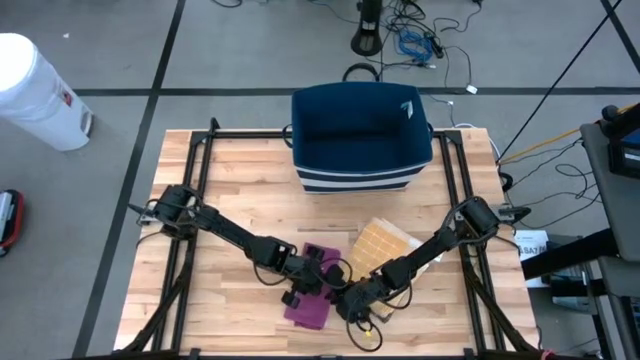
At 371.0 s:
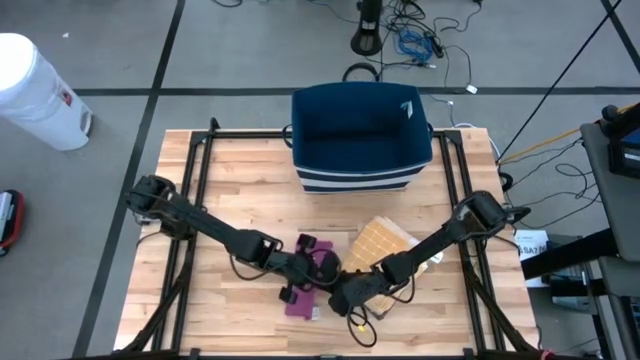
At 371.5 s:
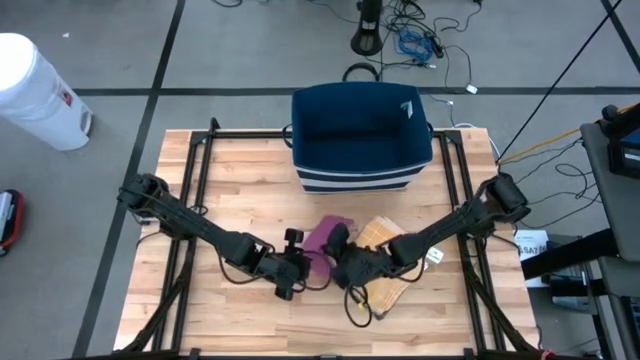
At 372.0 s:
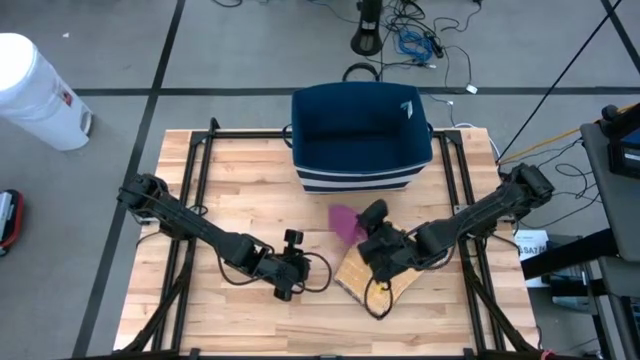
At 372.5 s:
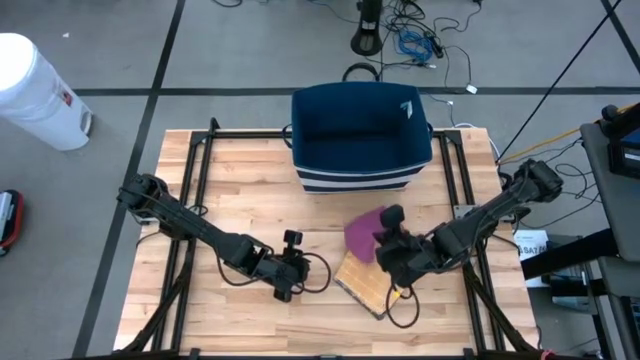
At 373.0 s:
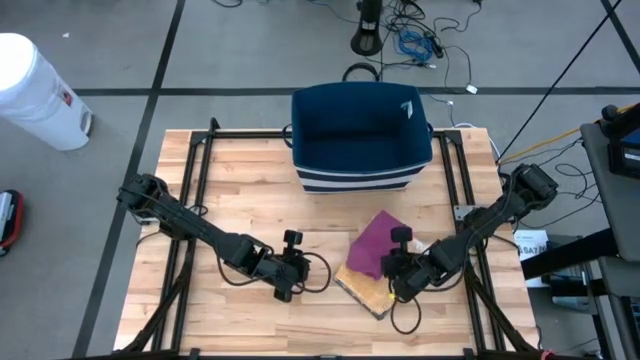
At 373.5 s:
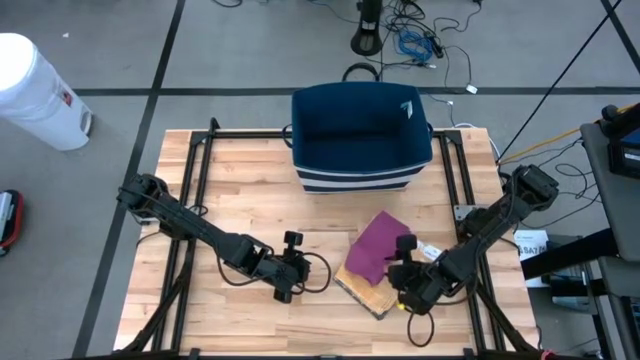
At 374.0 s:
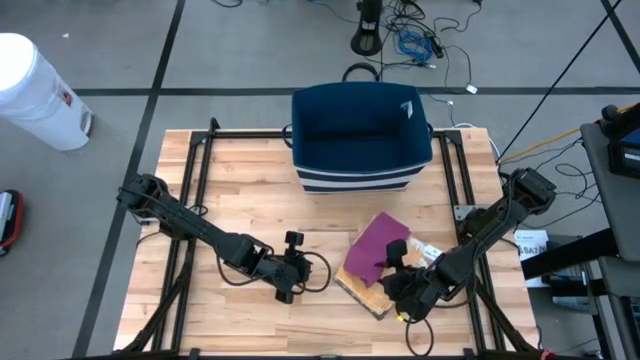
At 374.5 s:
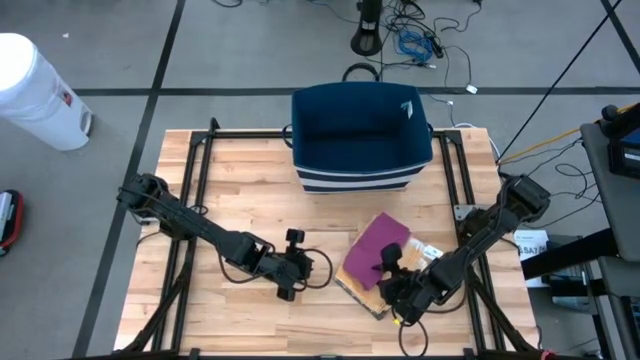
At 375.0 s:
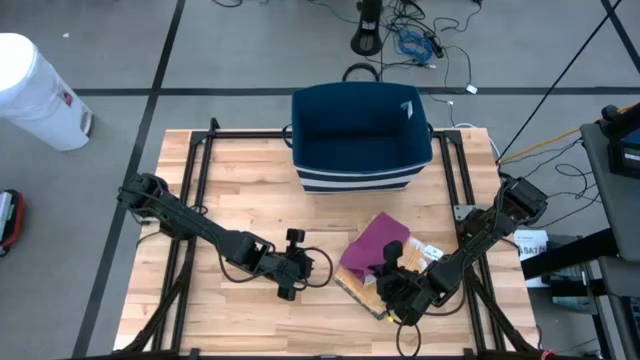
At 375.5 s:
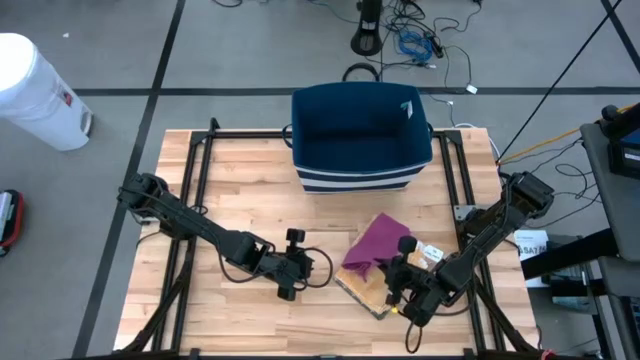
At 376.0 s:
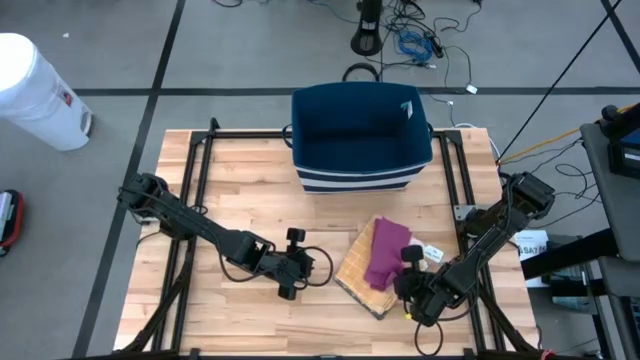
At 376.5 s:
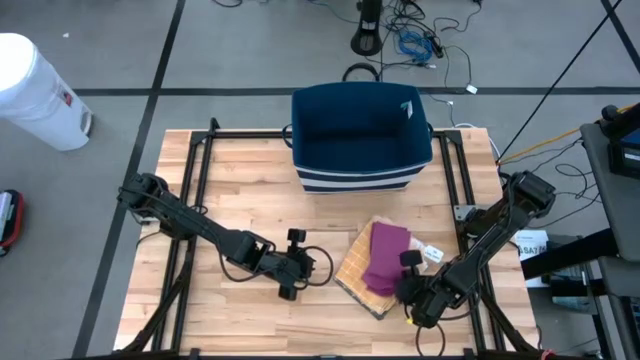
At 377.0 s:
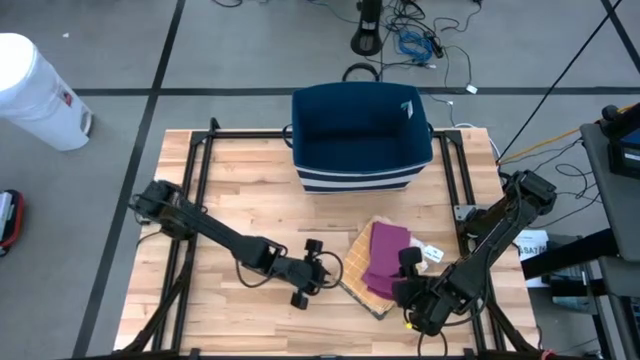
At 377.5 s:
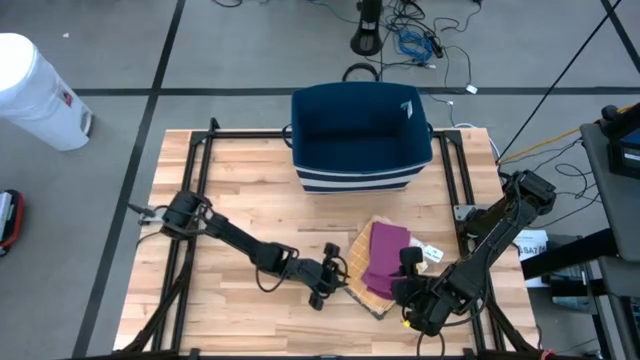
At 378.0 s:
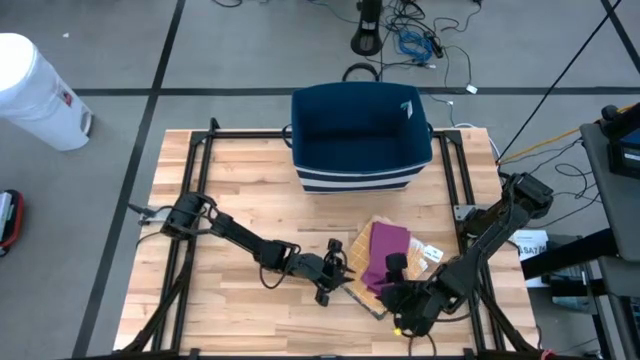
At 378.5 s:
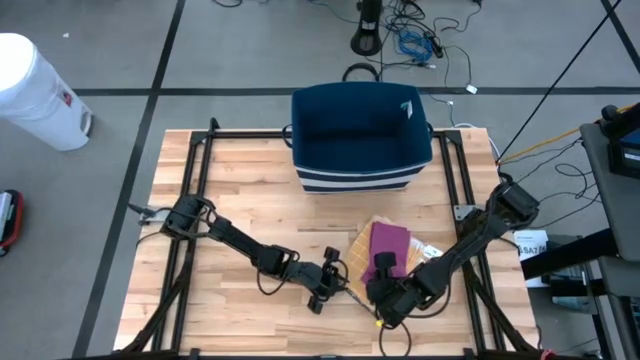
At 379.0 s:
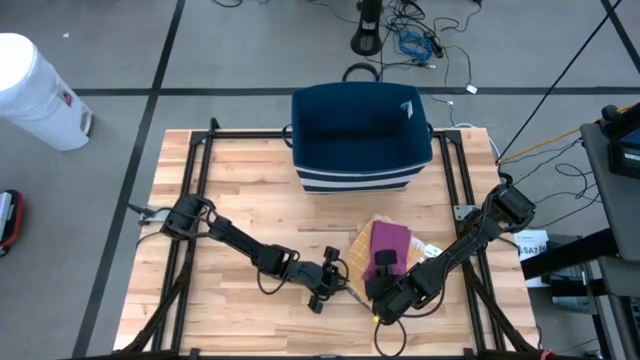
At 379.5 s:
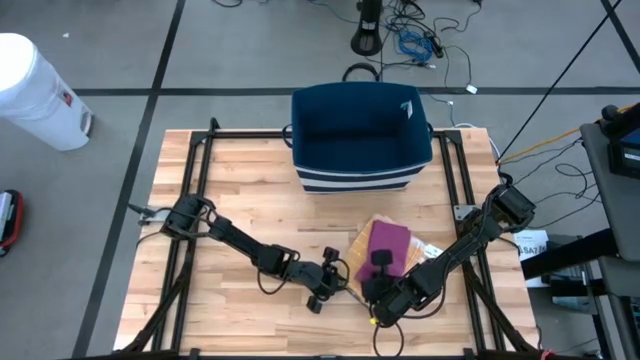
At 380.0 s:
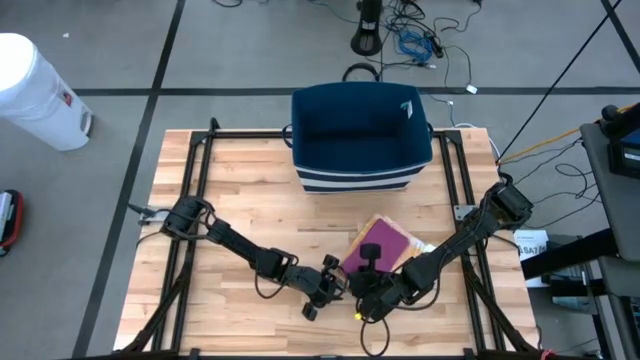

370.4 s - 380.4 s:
Task: Fold towel
Stack the purple towel on the orange patterned towel

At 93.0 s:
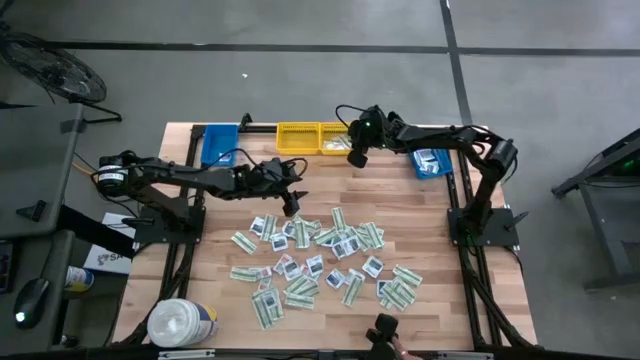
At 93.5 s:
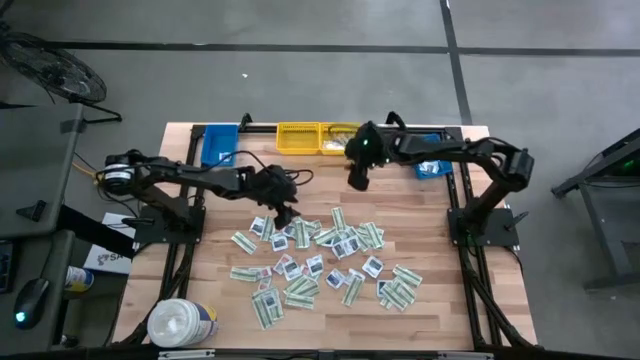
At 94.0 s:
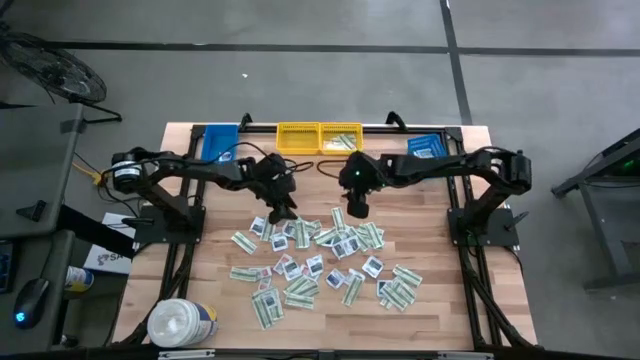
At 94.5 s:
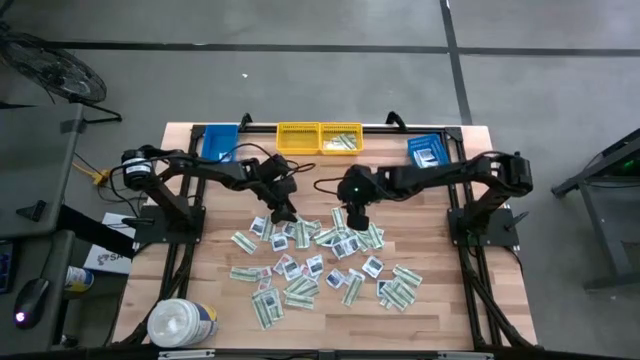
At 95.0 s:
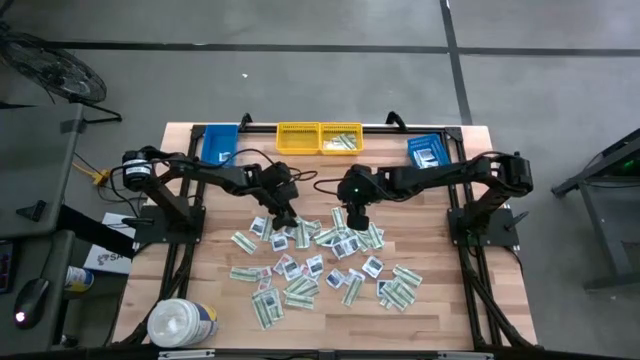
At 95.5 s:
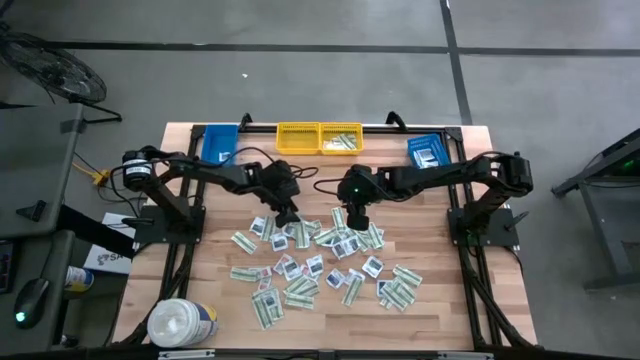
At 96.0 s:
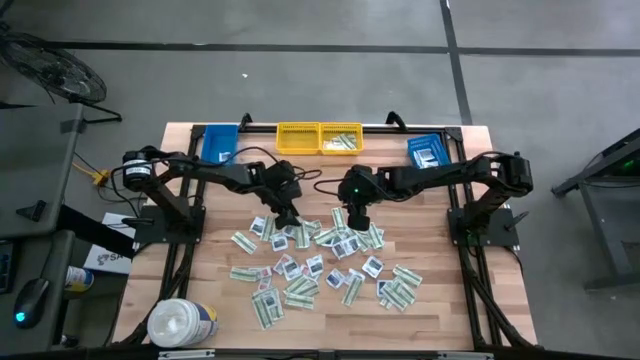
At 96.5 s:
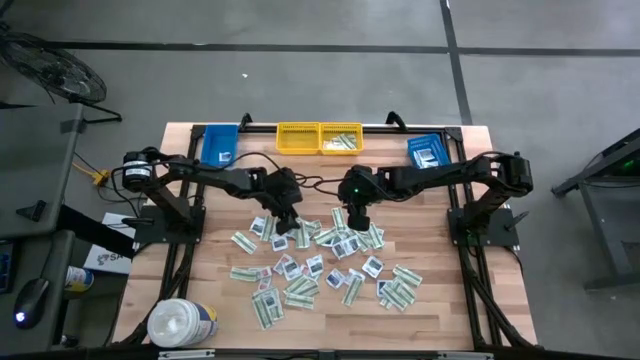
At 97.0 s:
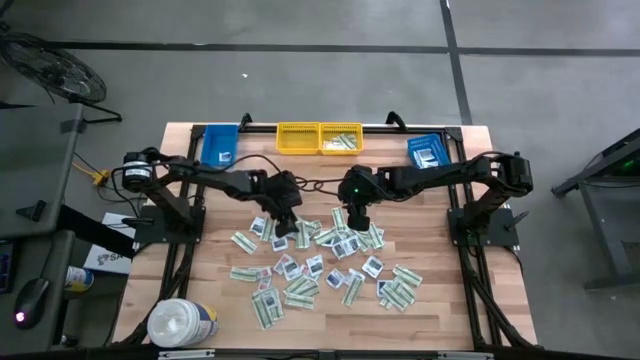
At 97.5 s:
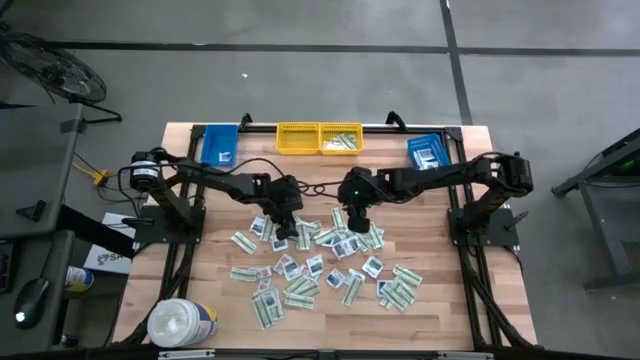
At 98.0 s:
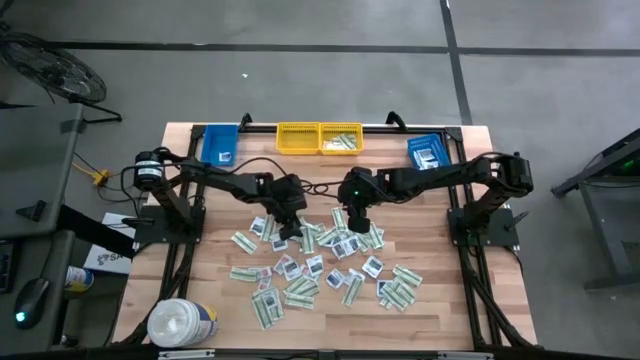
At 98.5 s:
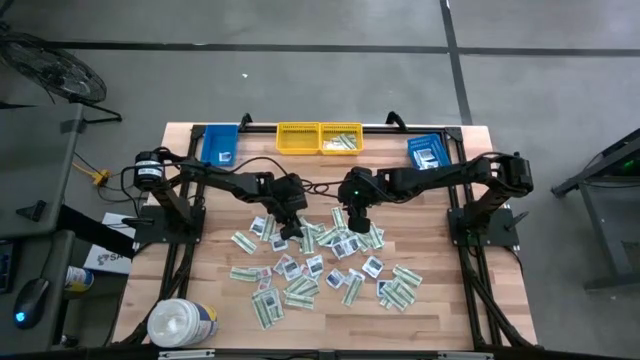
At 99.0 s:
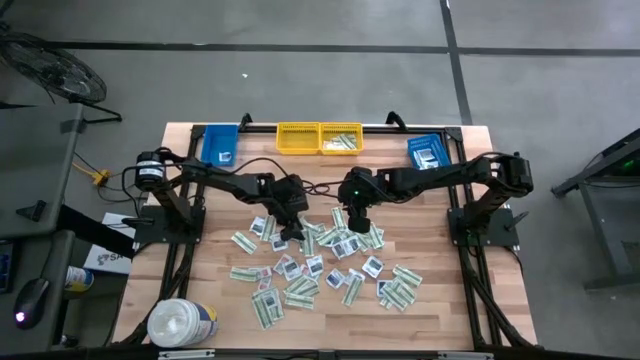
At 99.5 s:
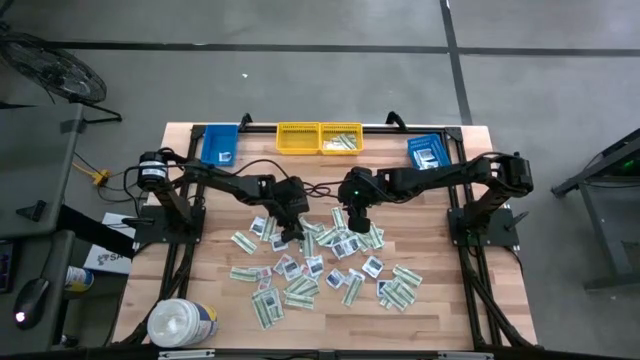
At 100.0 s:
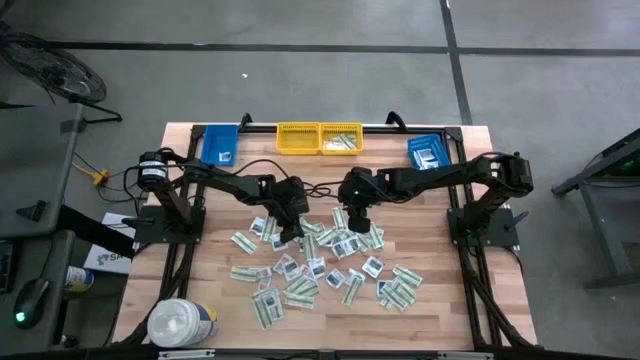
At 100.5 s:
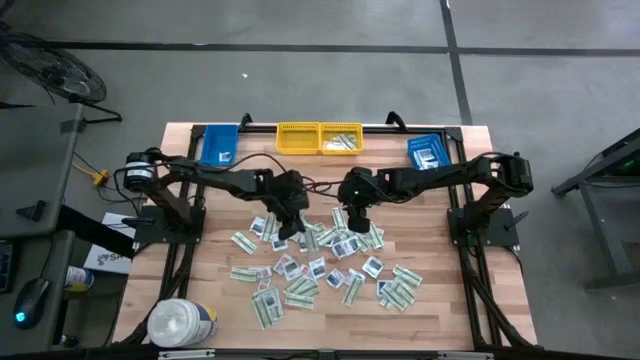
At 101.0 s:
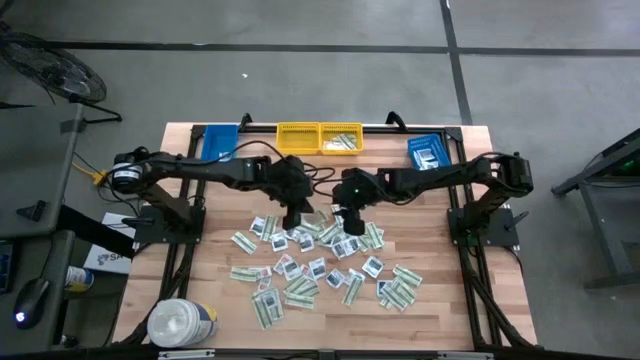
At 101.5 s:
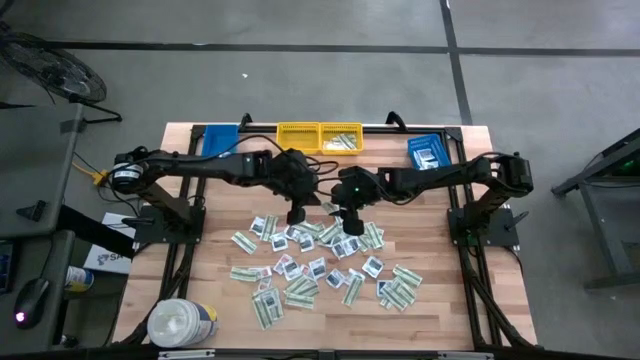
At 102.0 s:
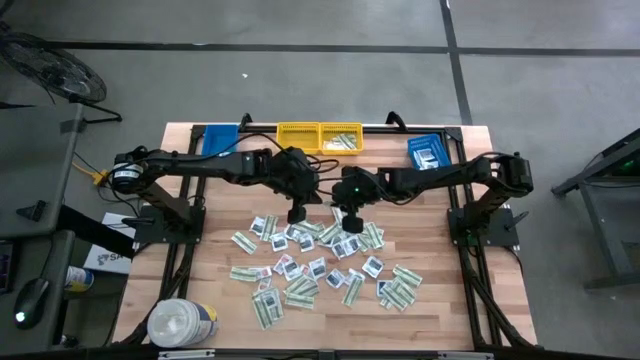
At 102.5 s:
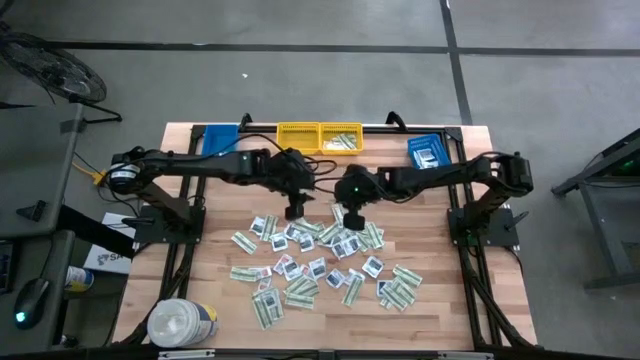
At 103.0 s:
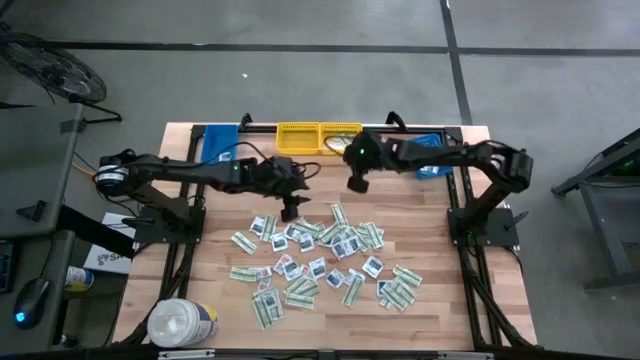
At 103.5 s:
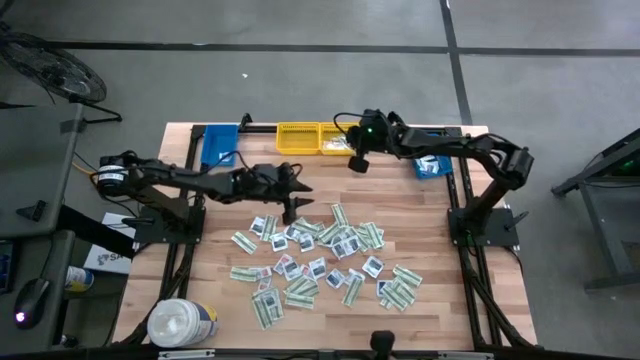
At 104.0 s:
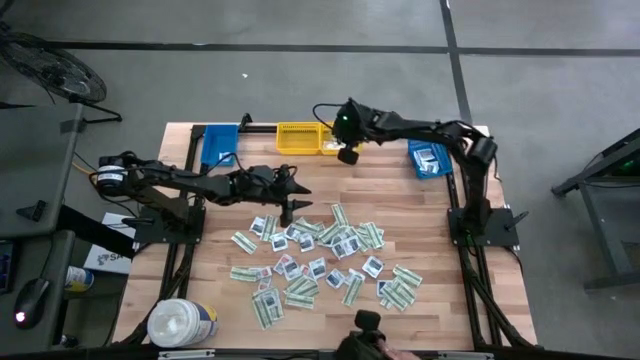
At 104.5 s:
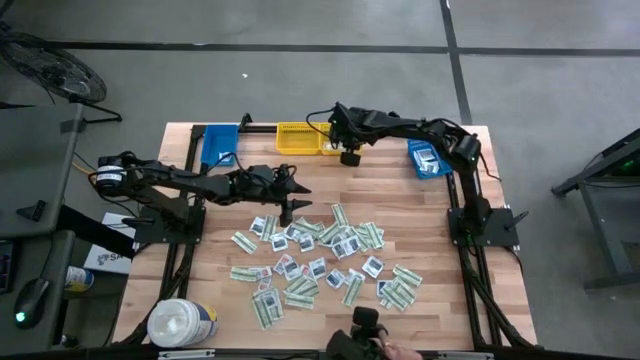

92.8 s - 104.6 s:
Task: Pick & Place First Aid Supplies
Put the green bandage pack into the right yellow bin
